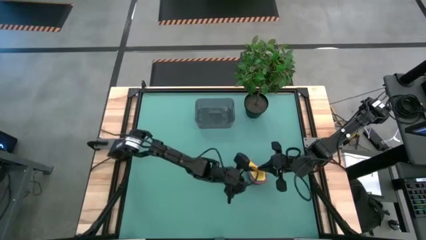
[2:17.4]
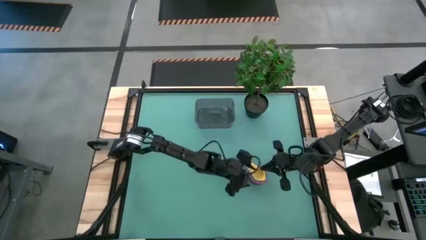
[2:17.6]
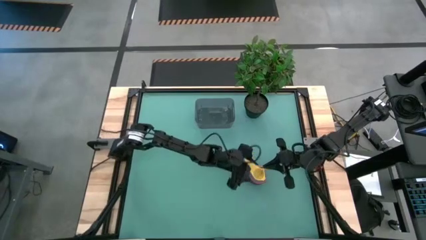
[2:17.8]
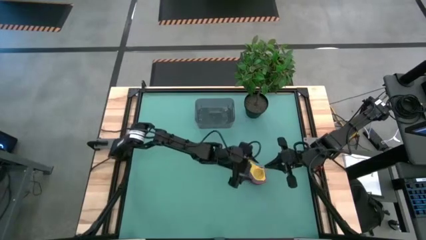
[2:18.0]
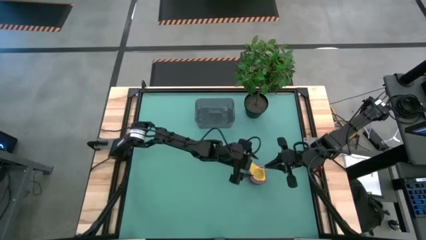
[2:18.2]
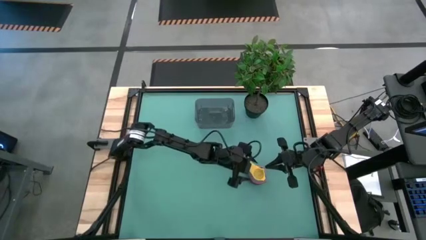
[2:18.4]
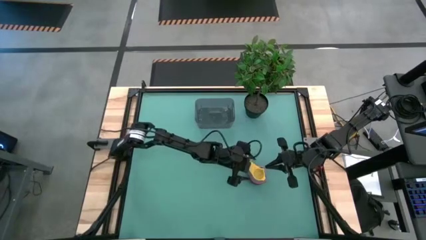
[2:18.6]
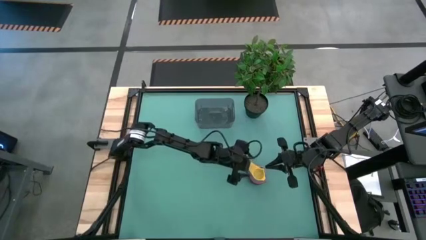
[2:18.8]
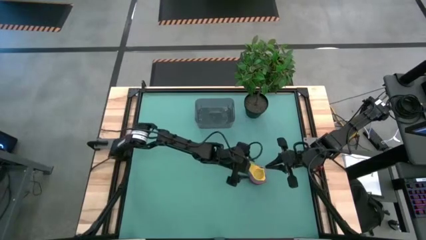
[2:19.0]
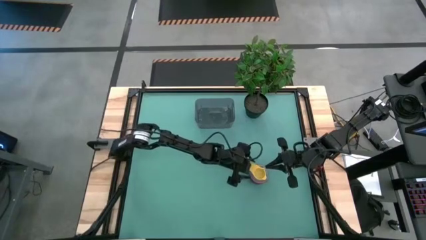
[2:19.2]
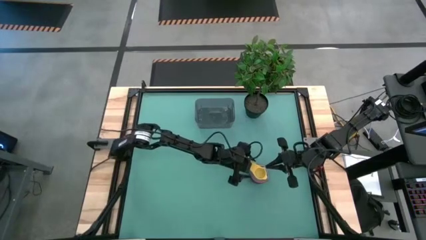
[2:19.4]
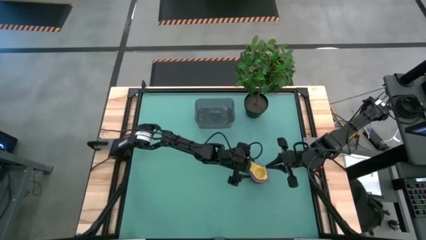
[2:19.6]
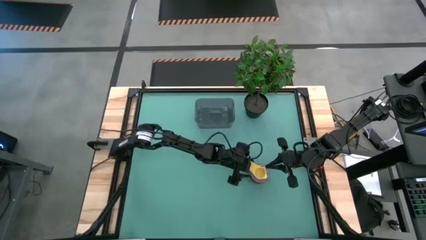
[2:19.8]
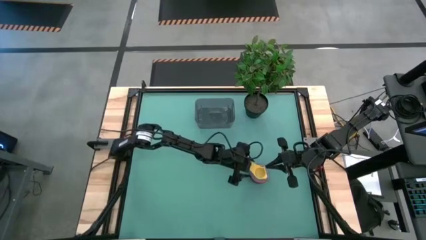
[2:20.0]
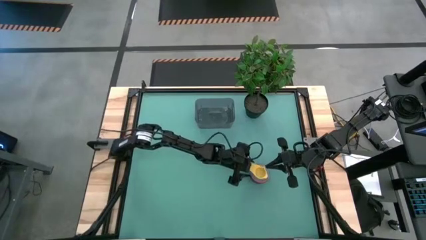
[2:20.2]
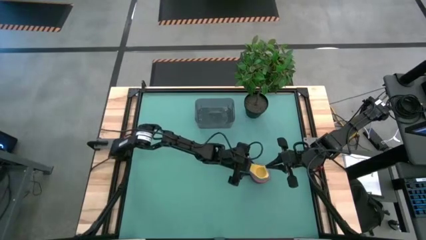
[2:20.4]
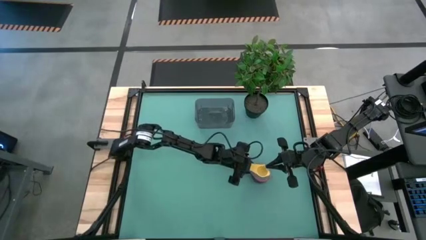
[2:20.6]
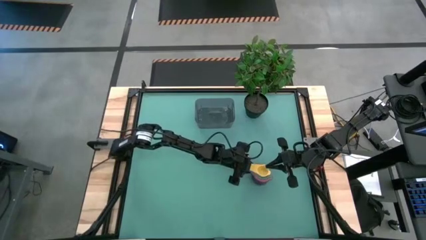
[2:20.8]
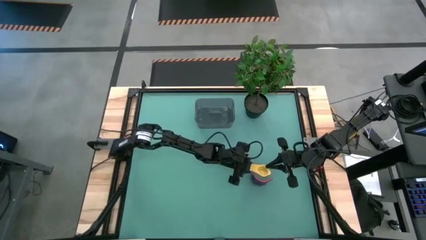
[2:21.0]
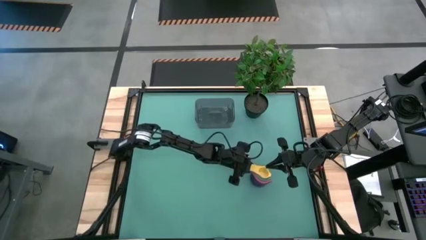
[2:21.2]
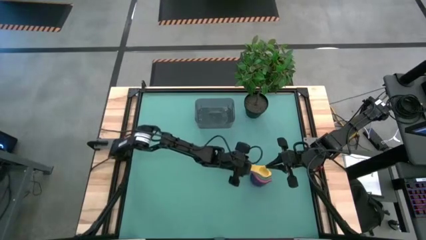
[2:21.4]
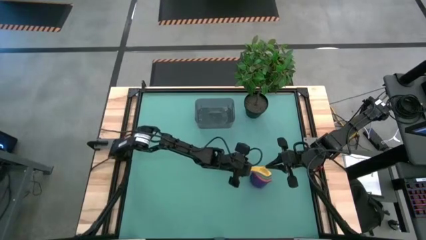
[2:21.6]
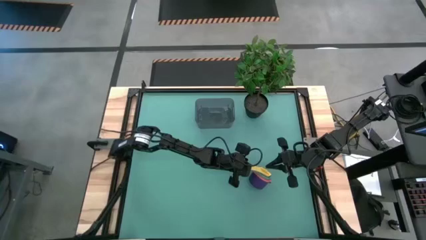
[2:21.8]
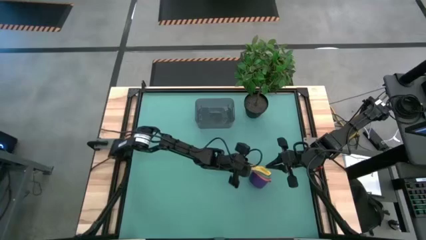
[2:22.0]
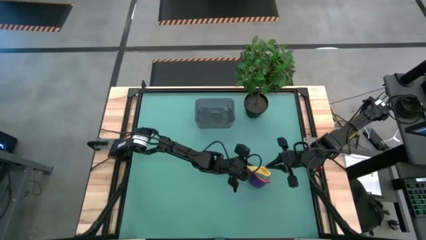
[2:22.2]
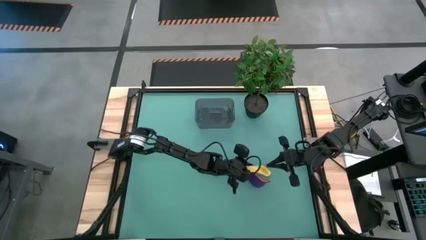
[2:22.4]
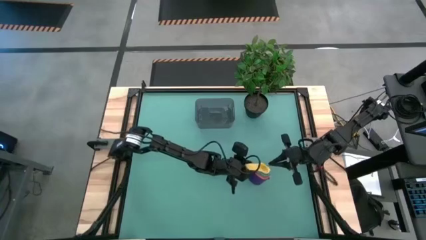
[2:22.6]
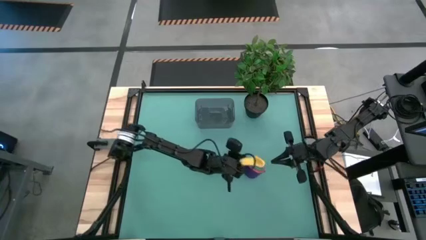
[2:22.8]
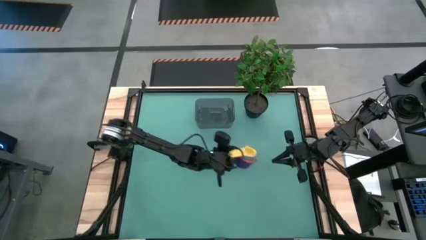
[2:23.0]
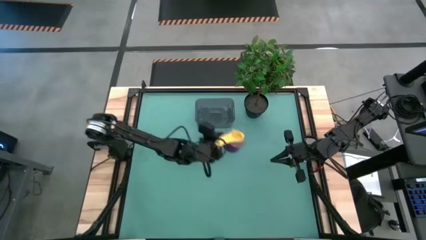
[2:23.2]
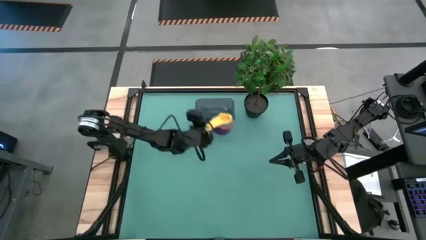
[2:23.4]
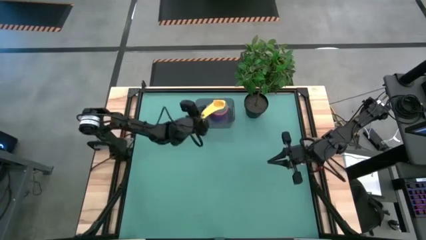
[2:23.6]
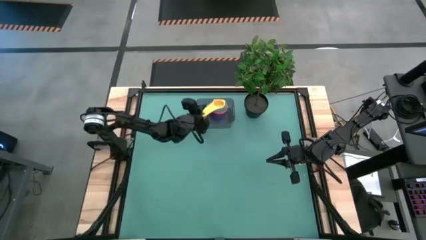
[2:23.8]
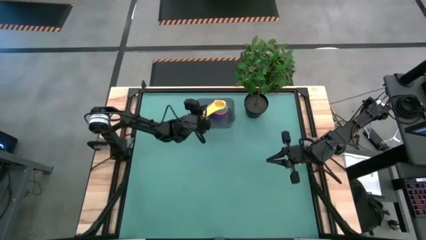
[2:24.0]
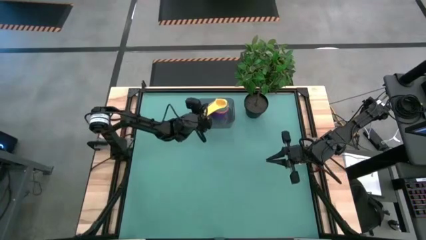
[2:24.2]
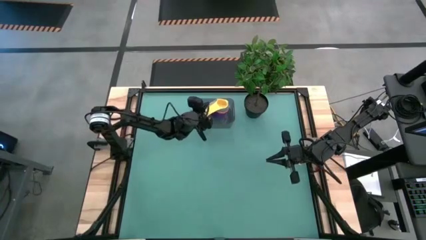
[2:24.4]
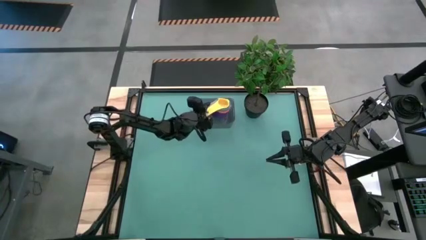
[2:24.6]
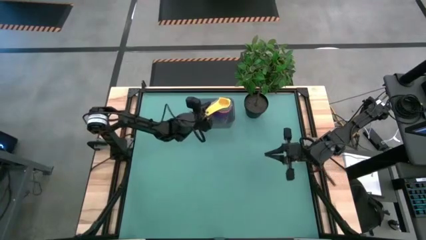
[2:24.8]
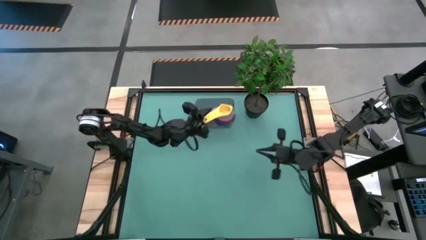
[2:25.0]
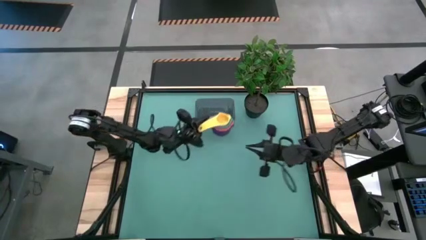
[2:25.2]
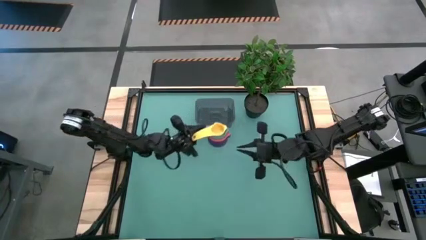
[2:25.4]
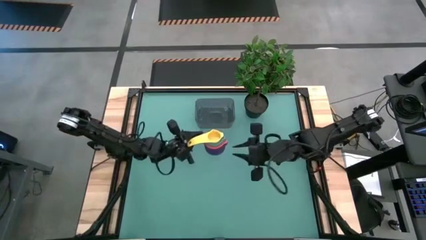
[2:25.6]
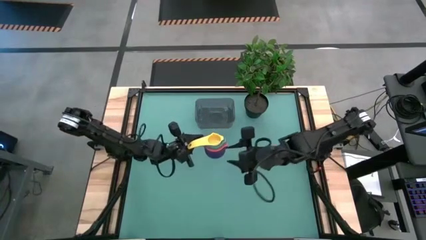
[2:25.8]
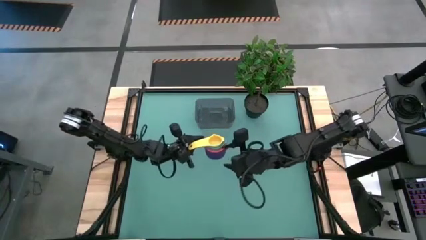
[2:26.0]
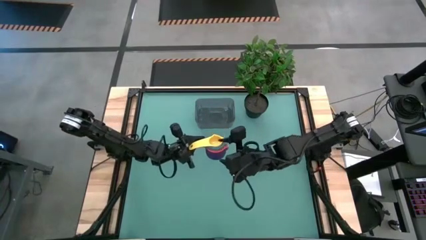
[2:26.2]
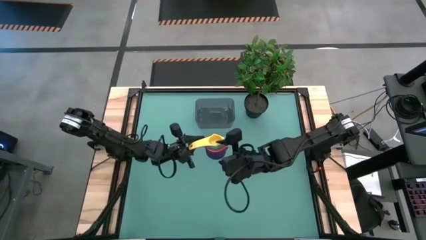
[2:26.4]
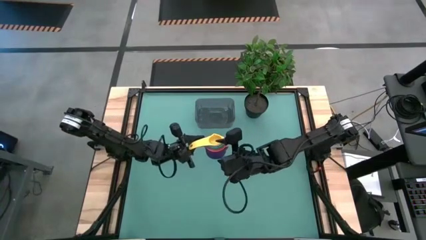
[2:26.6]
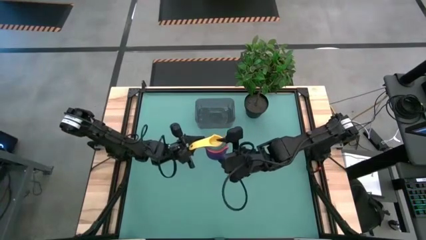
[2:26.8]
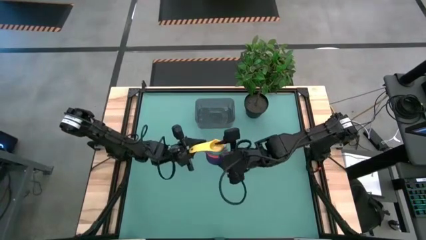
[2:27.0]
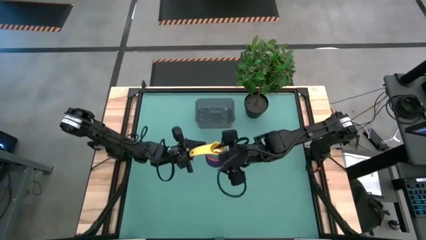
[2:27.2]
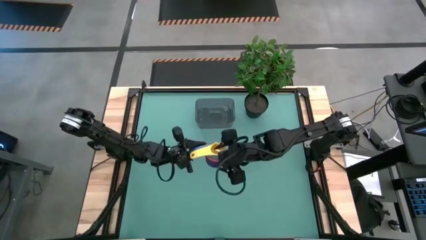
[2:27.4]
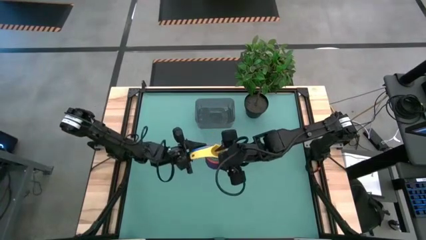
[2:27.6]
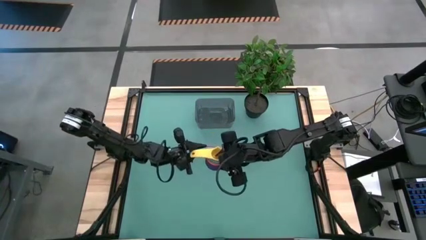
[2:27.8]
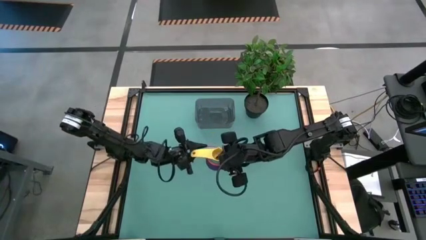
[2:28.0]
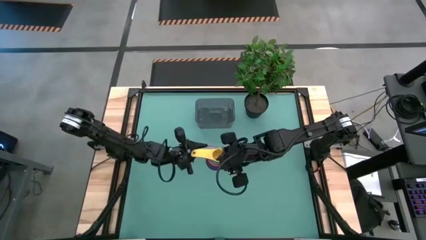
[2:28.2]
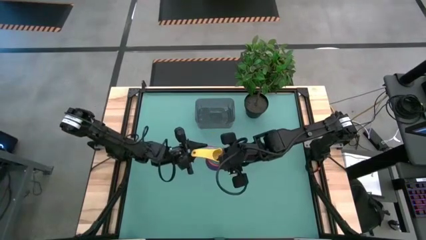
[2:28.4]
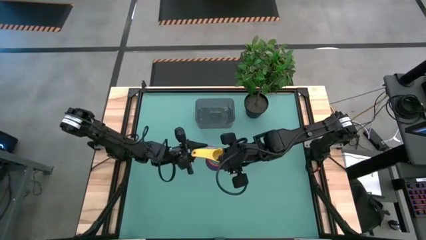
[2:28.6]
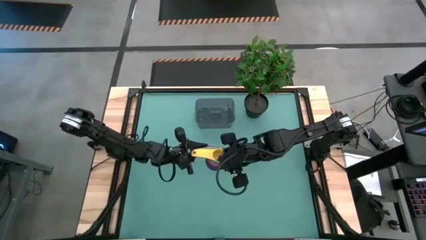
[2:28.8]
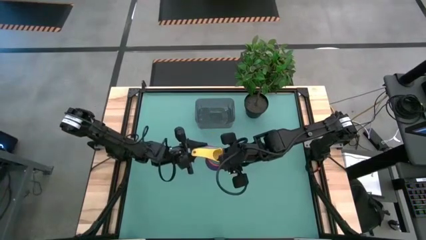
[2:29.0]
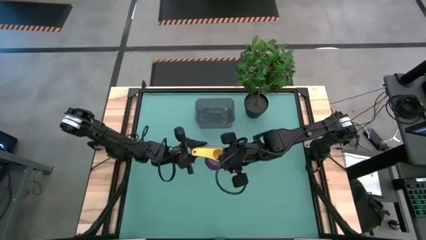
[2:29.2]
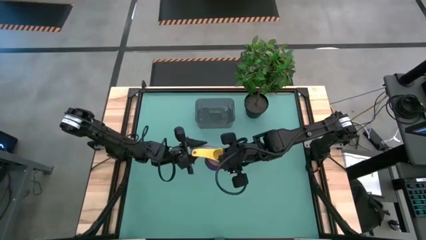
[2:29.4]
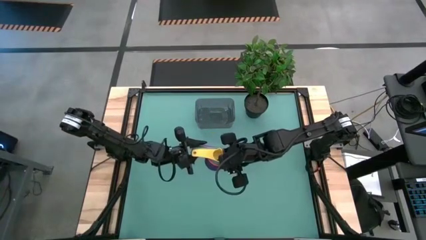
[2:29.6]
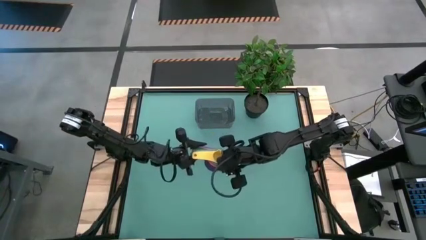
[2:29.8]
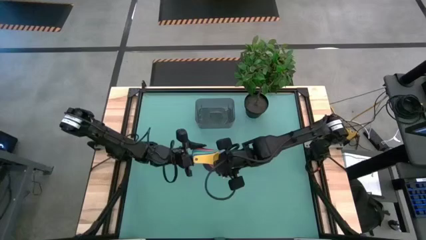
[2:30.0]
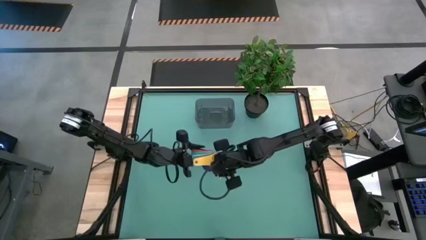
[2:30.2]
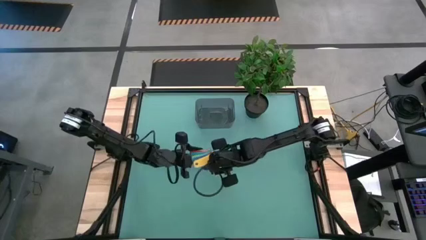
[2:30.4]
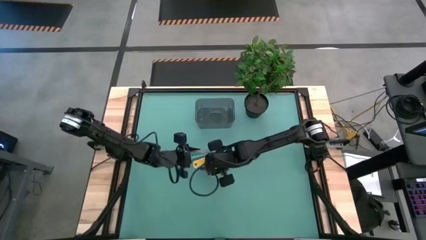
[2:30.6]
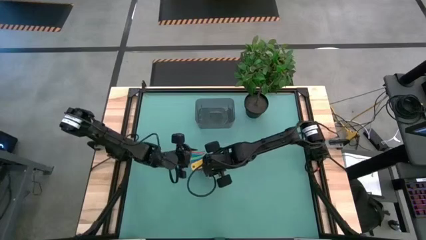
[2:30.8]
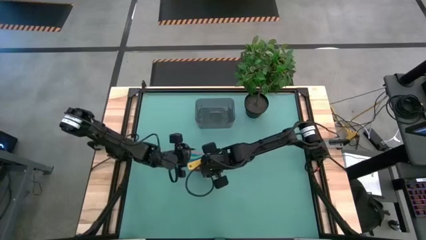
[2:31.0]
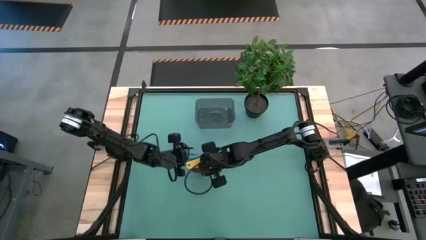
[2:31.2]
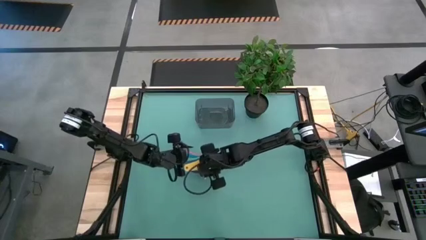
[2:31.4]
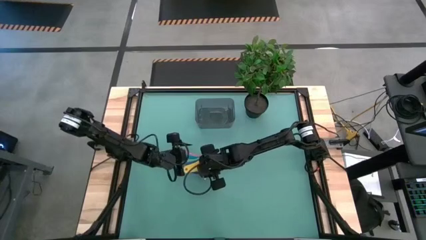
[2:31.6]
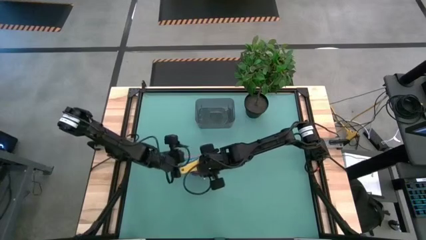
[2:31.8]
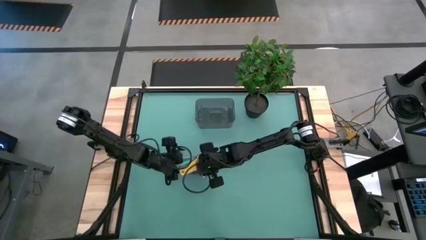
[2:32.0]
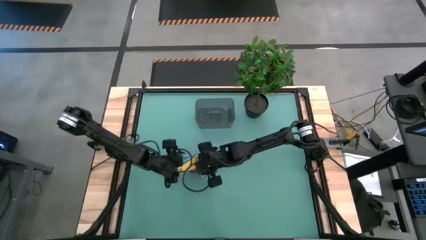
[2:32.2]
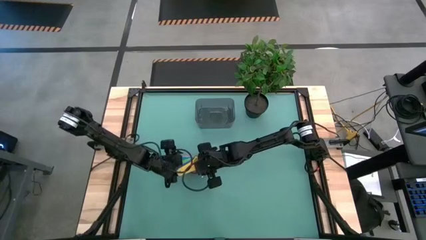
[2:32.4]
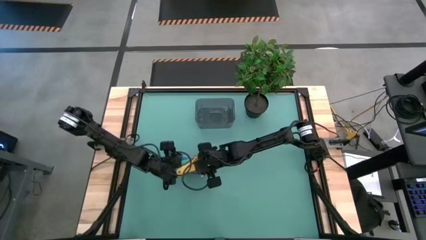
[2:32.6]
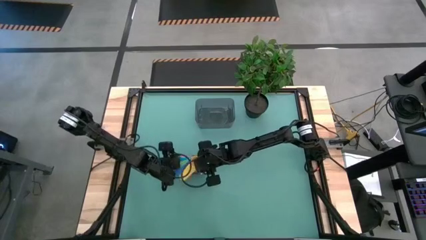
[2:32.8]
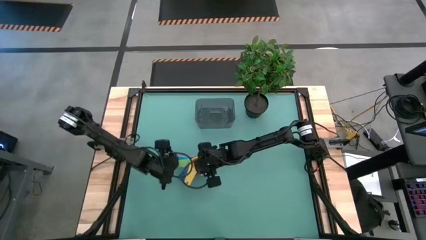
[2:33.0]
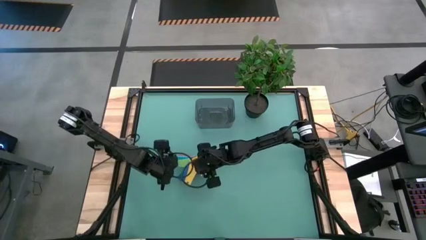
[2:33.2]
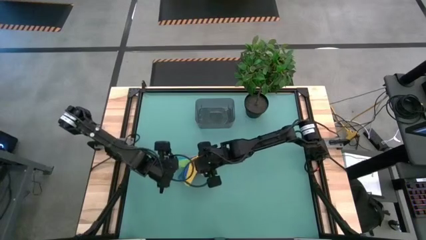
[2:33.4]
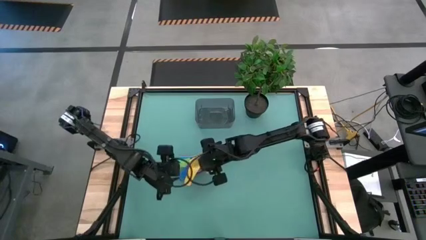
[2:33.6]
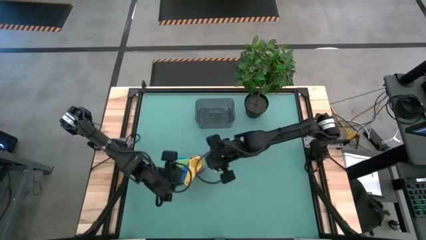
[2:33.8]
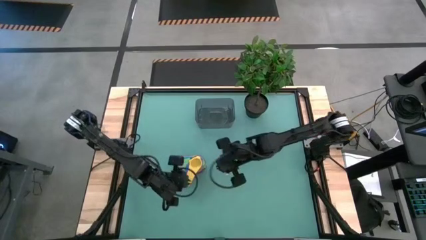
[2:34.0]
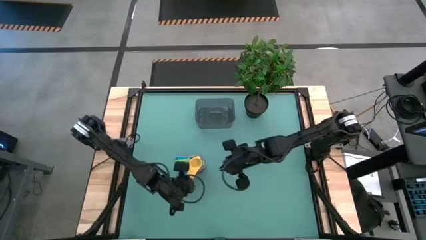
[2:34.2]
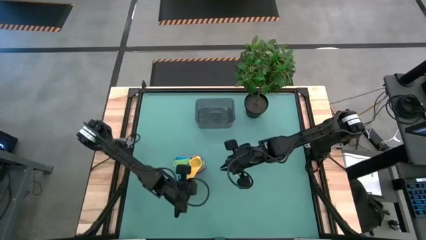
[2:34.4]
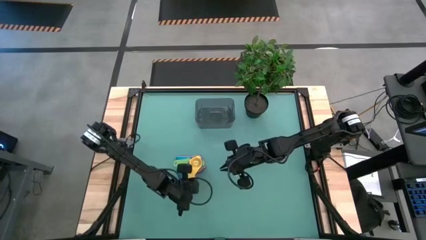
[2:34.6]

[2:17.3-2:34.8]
Task: Nest measuring cups in basket
Put the measuring cup into the bin
